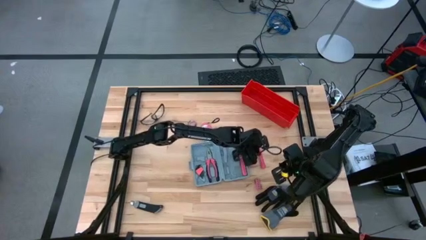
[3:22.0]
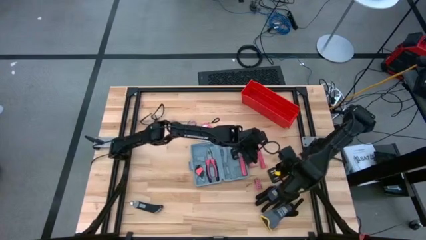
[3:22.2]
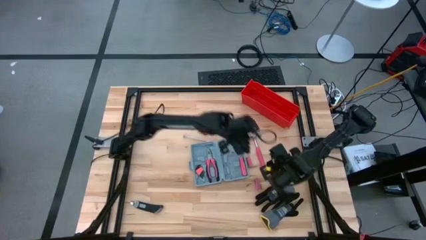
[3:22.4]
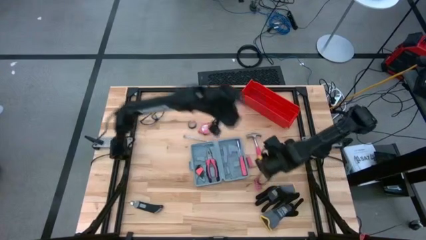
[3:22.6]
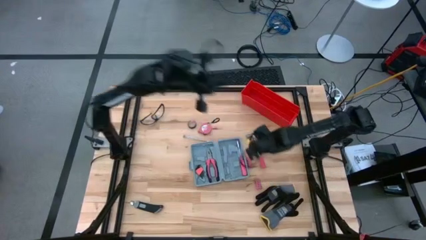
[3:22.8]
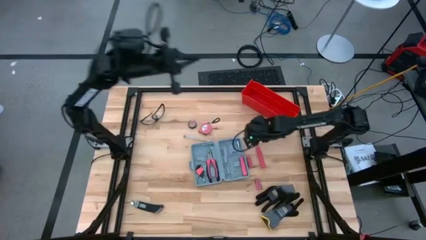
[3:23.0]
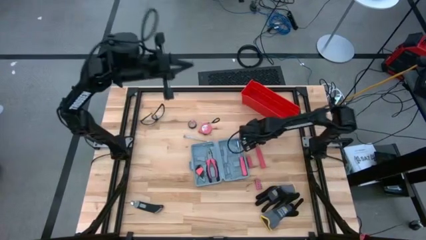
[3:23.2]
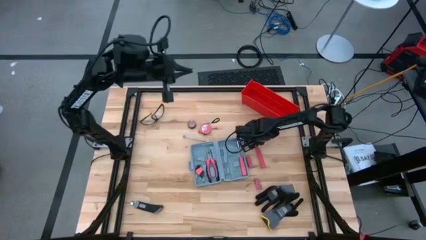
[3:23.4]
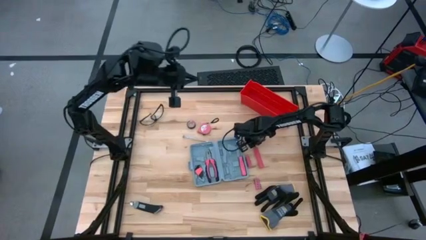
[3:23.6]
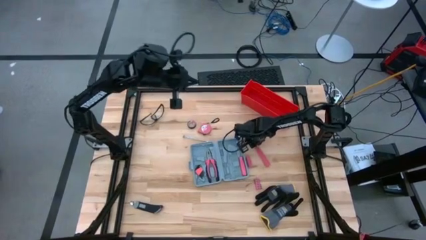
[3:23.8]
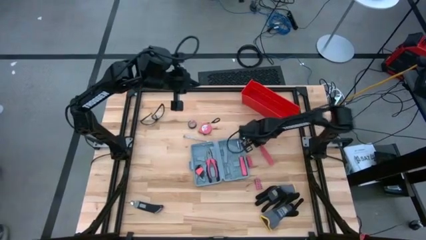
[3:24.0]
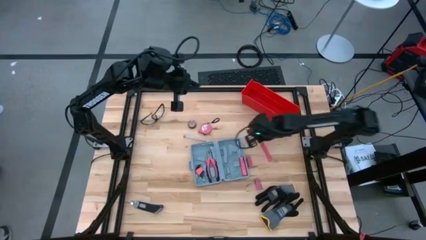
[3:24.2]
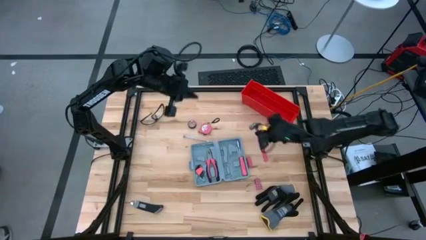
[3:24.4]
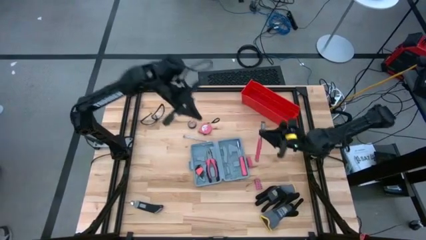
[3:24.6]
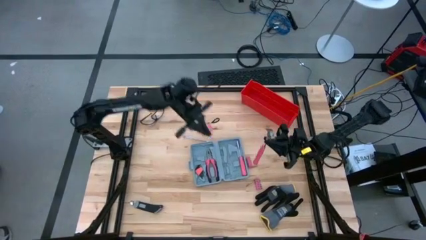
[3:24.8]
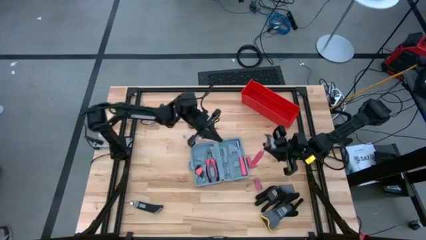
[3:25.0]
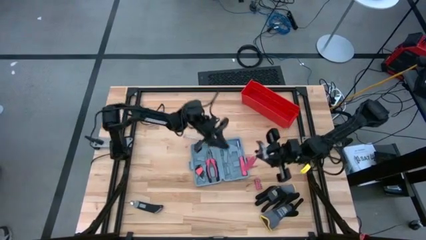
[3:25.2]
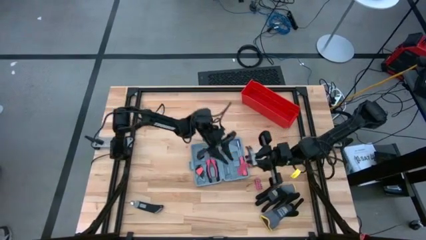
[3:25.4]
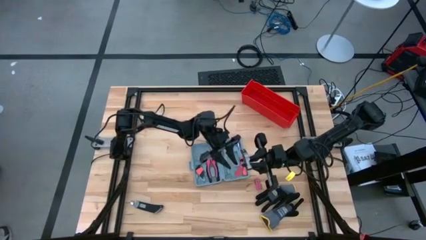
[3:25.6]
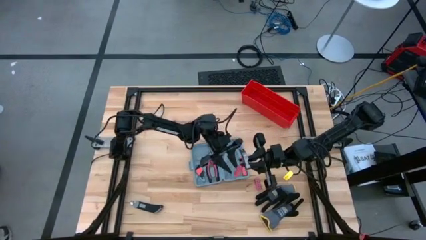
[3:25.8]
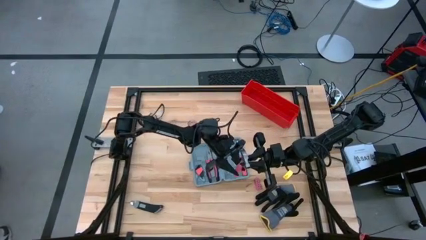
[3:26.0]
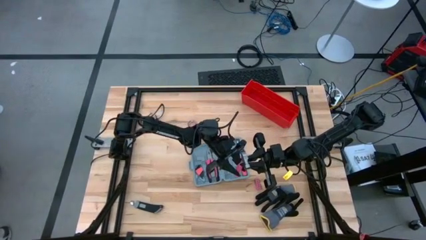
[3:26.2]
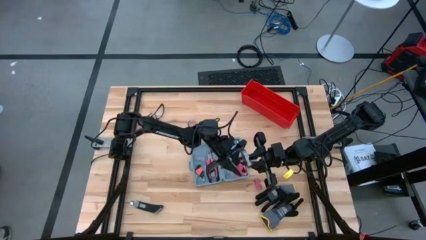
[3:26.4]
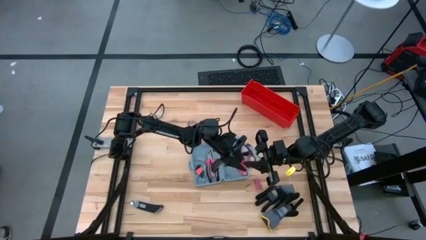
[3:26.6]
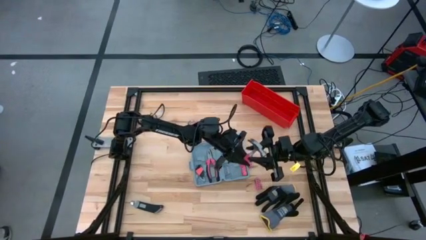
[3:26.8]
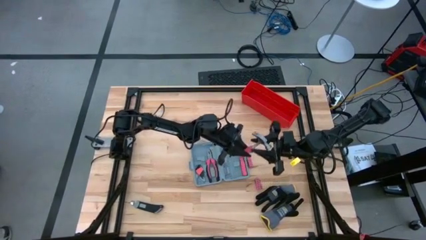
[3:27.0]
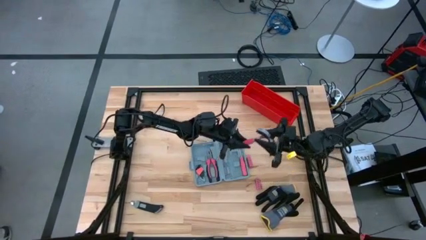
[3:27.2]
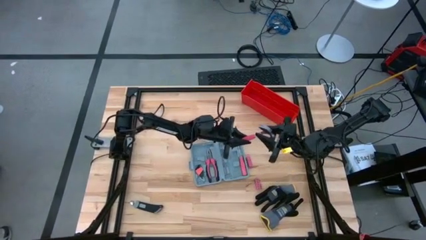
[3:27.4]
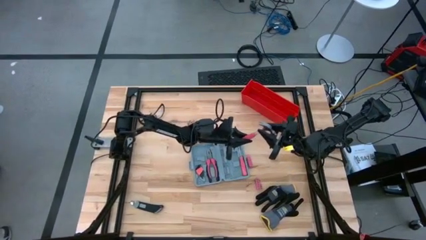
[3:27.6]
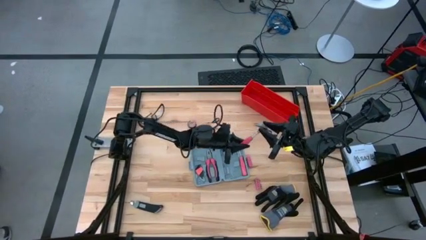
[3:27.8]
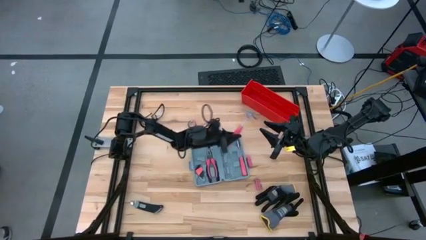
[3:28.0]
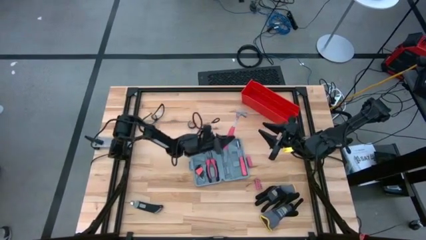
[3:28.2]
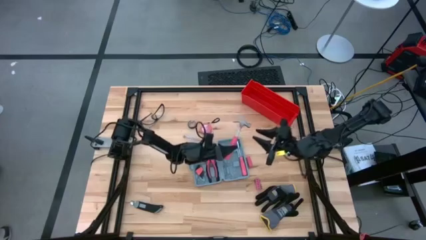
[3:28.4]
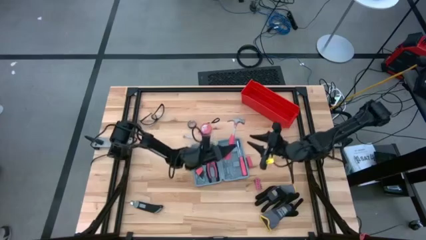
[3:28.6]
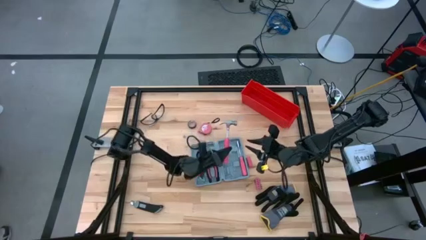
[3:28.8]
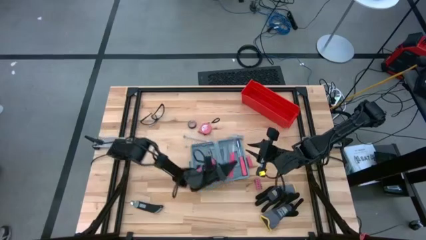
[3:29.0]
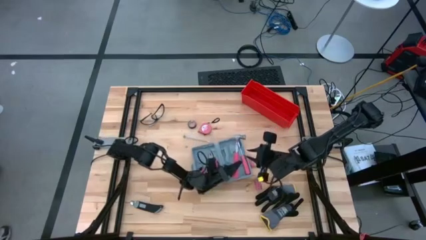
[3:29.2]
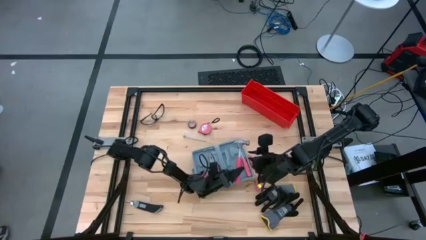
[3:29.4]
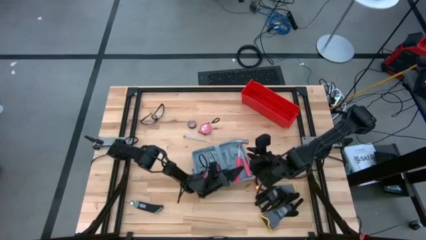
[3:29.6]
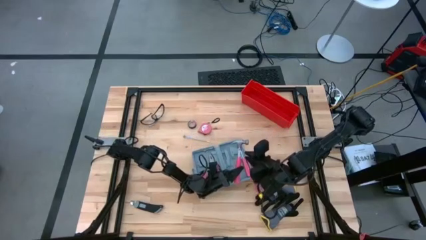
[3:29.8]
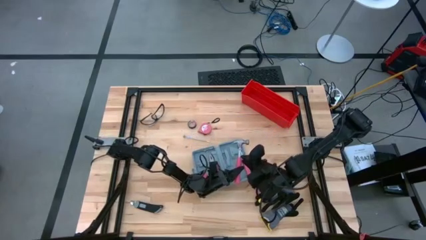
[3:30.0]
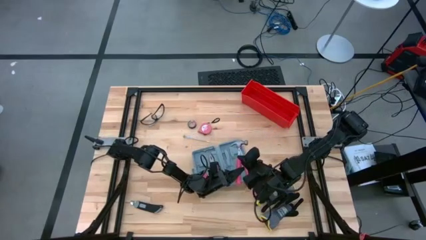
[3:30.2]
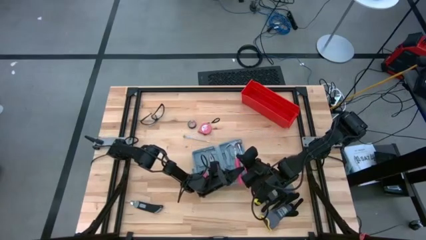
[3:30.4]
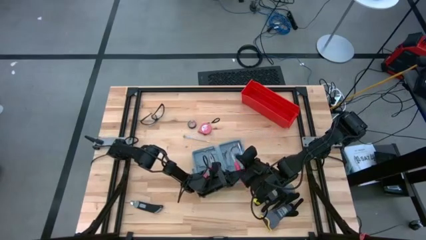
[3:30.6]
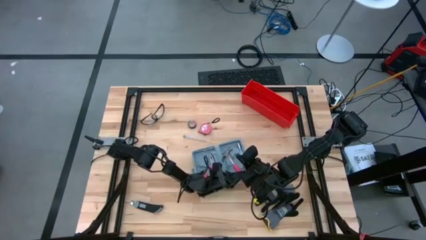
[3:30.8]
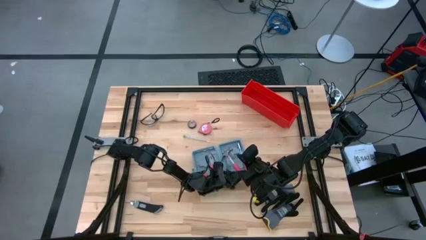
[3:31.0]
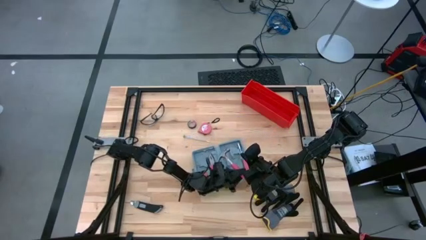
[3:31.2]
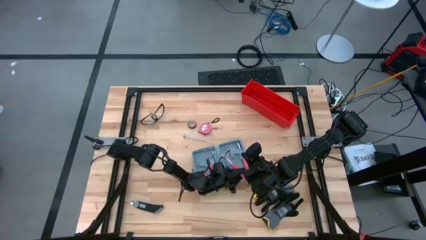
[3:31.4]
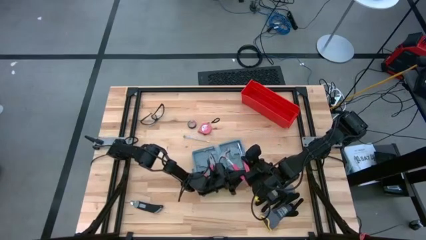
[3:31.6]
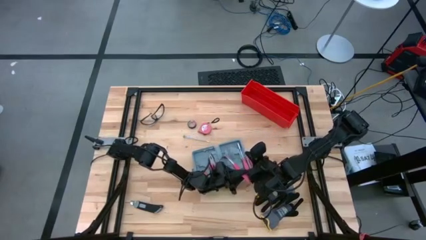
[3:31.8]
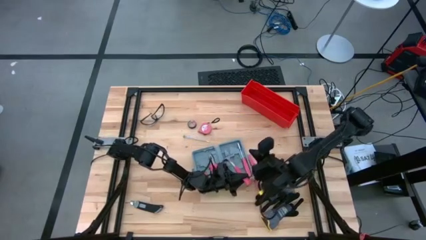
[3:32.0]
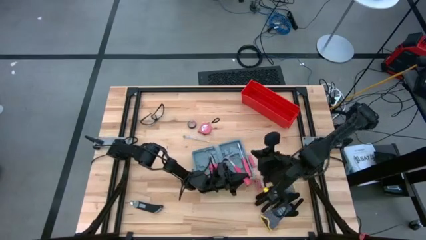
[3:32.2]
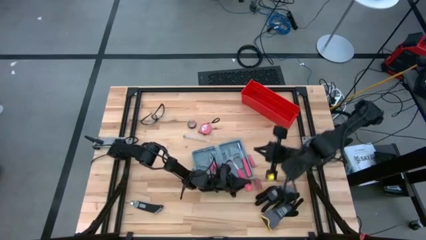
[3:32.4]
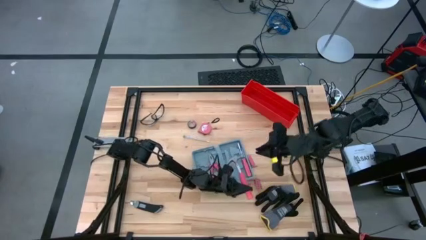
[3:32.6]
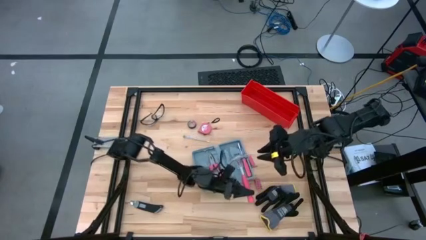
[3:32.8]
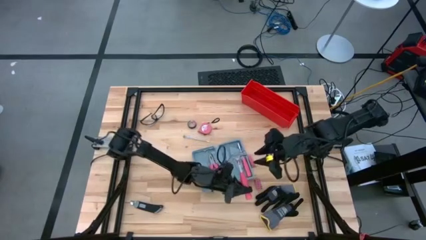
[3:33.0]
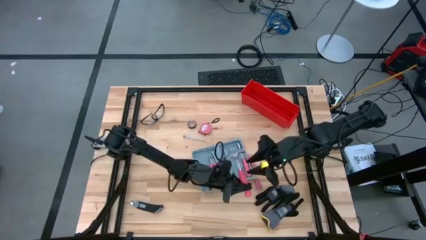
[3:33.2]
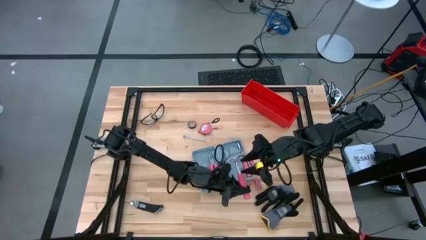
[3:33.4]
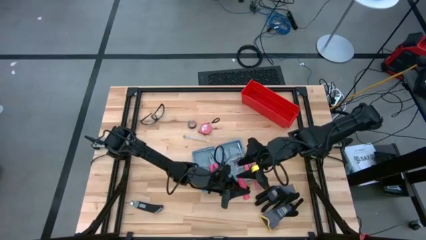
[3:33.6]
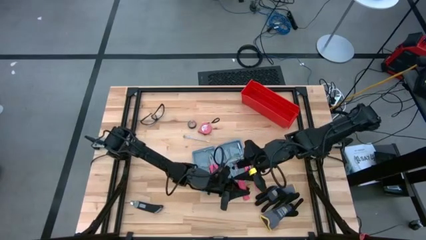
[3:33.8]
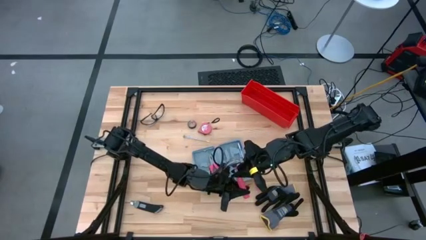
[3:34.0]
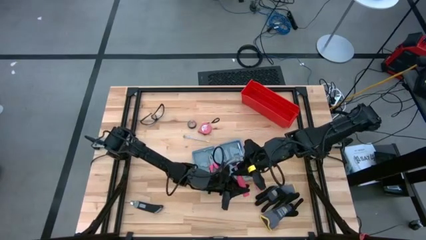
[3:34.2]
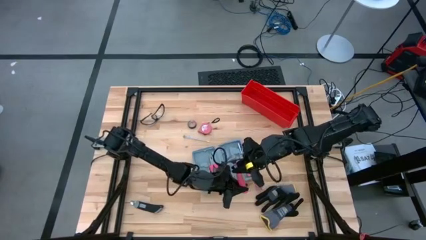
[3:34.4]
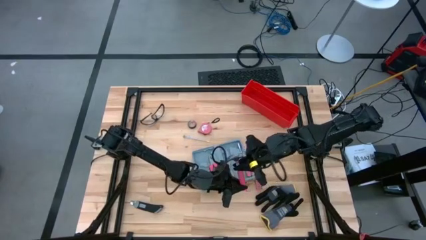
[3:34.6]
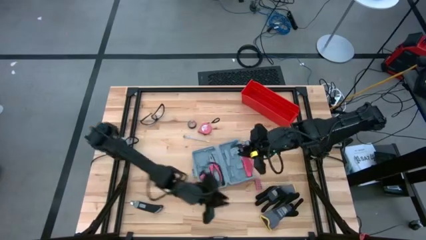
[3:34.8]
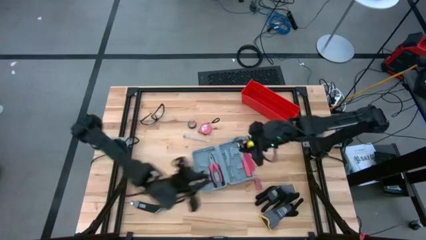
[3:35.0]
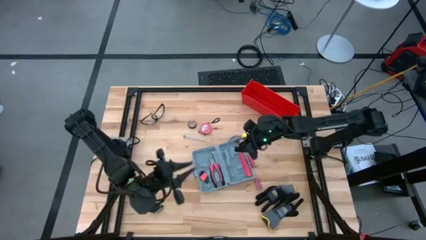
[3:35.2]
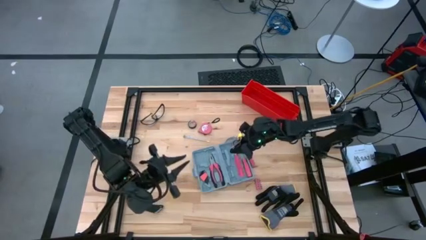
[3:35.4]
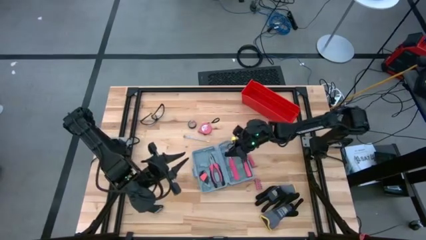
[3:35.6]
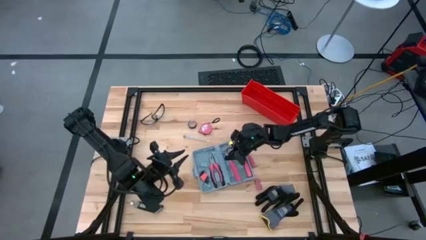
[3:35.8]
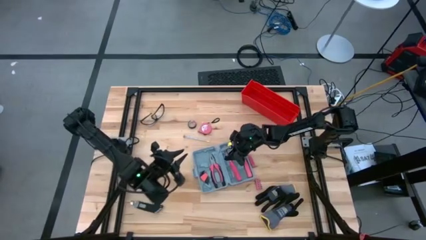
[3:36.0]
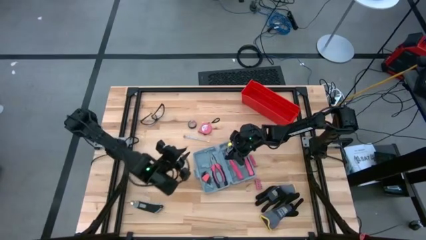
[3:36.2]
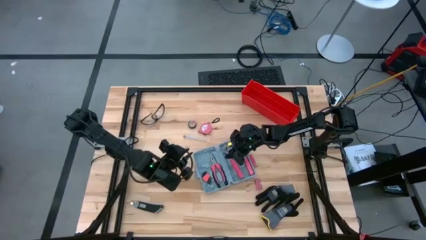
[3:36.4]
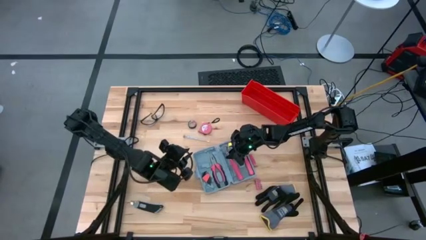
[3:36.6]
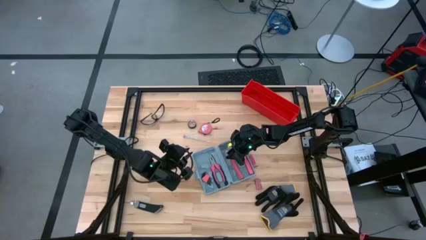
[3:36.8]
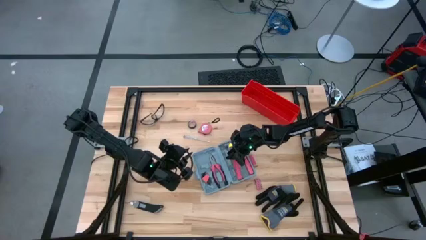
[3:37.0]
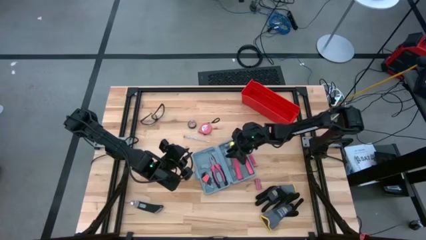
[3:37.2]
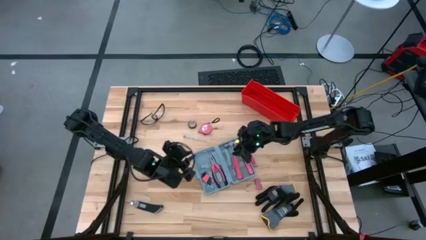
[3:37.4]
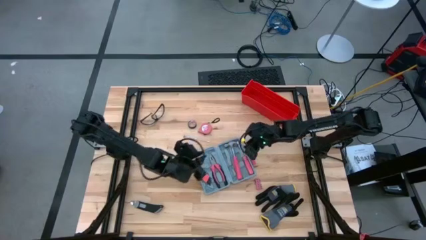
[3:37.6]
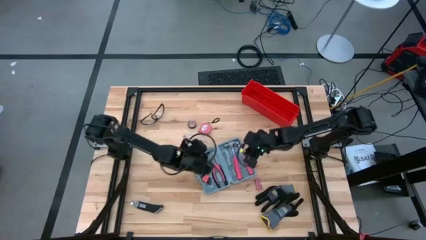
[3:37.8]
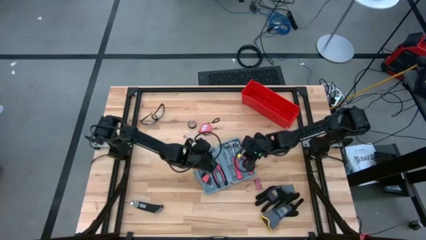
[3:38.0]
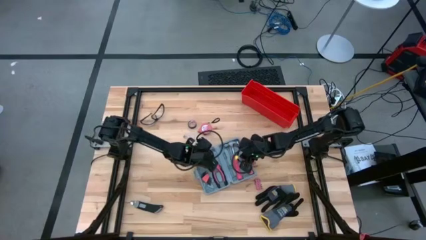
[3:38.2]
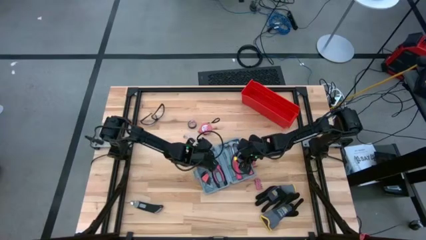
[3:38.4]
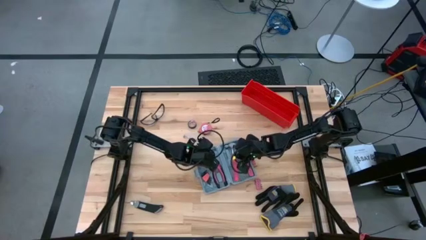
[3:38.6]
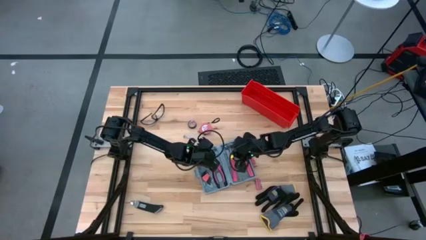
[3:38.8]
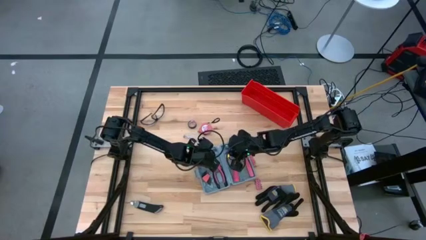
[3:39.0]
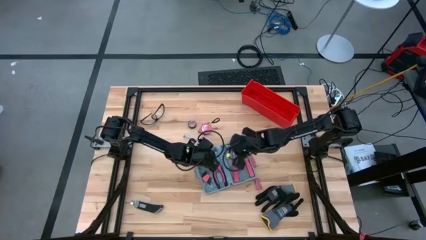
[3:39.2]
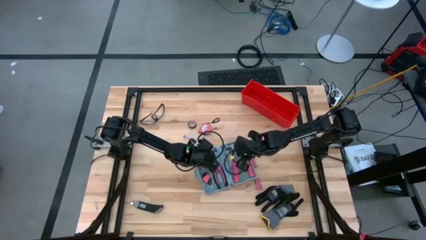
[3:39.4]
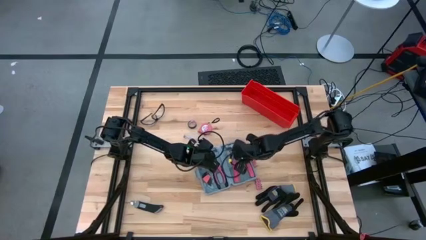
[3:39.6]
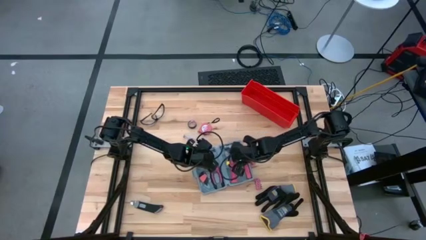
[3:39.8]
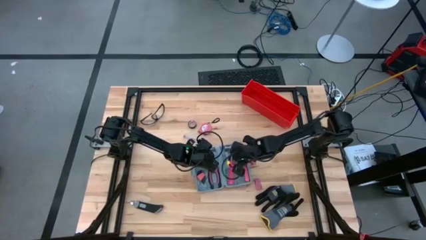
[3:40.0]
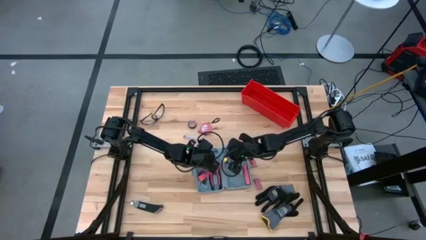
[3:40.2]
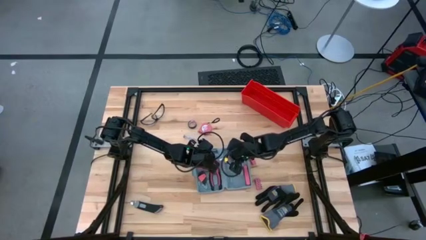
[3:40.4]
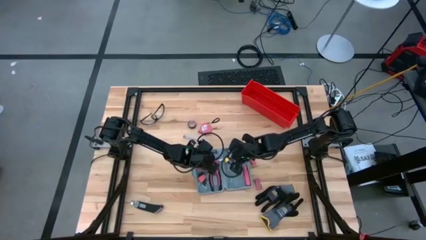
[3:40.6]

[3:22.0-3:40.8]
Task: prefit tool cases
Put the hammer into the toolbox
